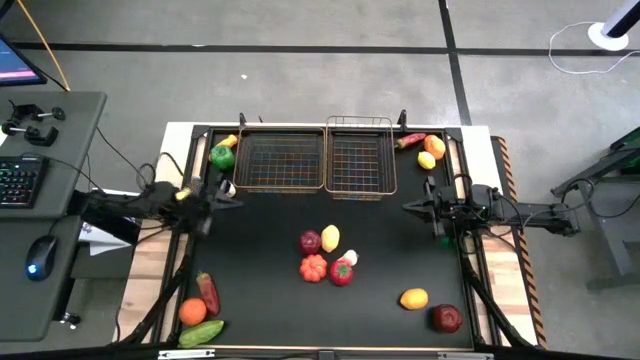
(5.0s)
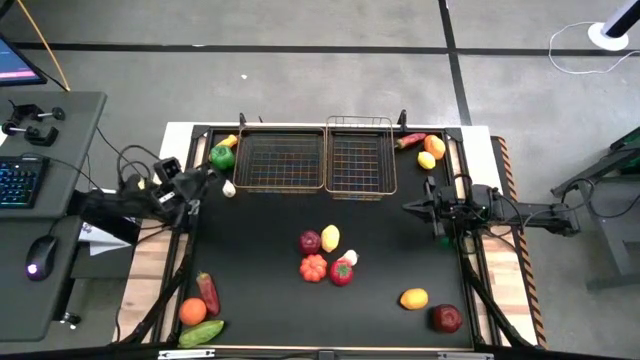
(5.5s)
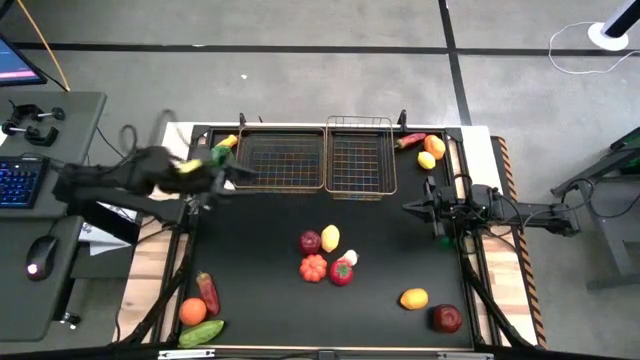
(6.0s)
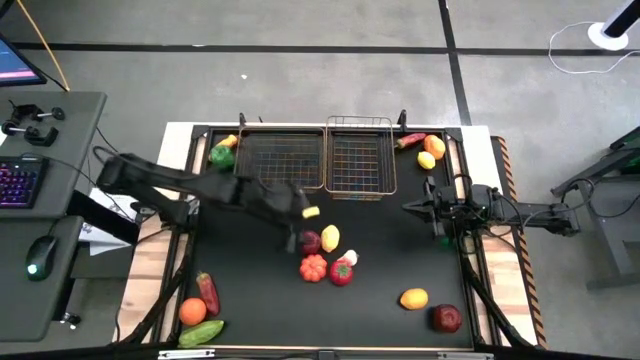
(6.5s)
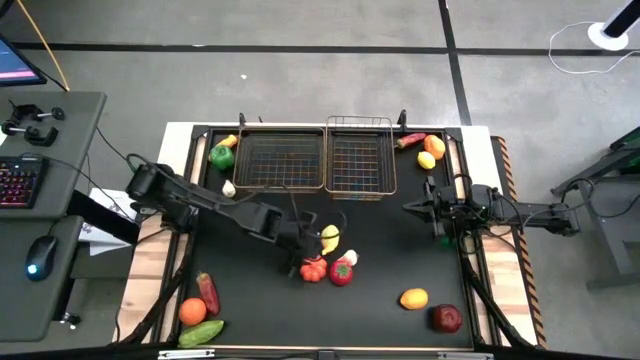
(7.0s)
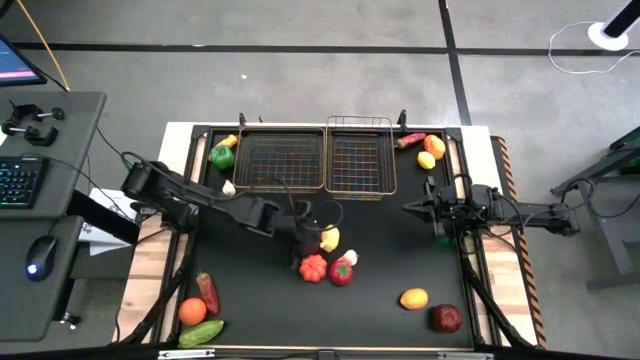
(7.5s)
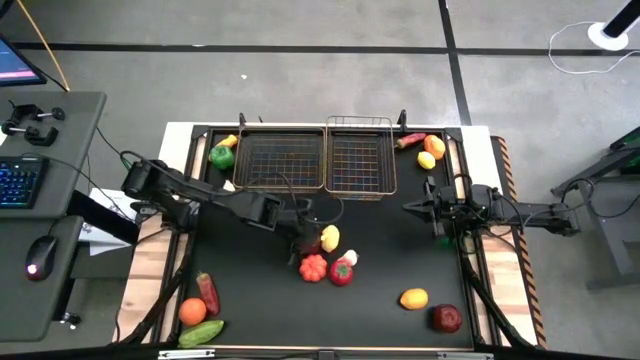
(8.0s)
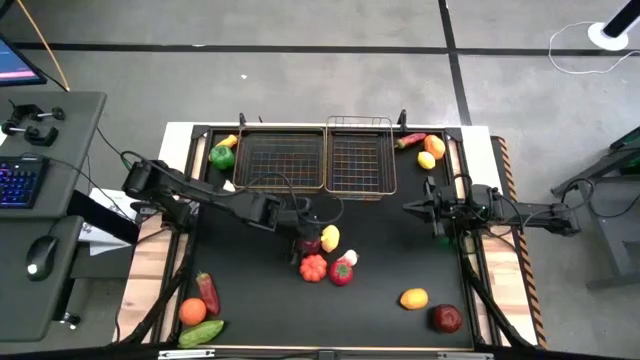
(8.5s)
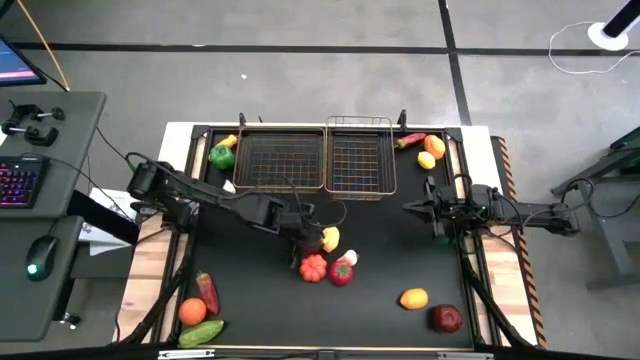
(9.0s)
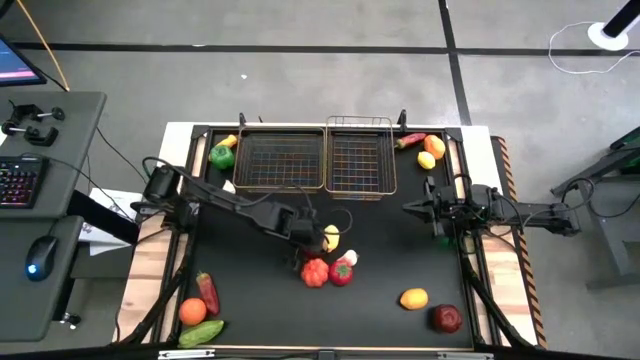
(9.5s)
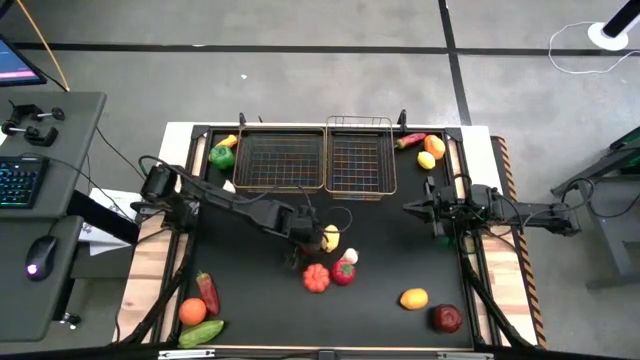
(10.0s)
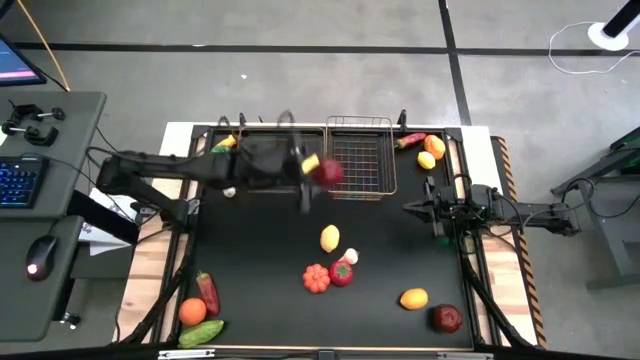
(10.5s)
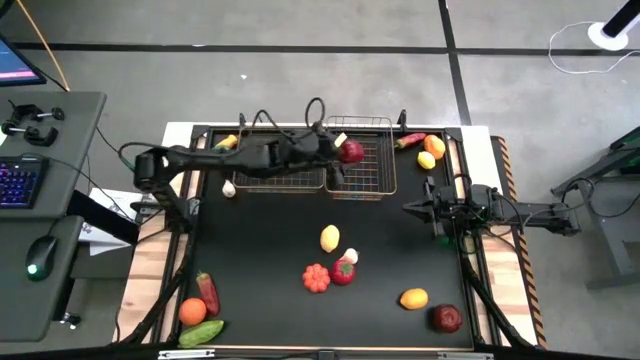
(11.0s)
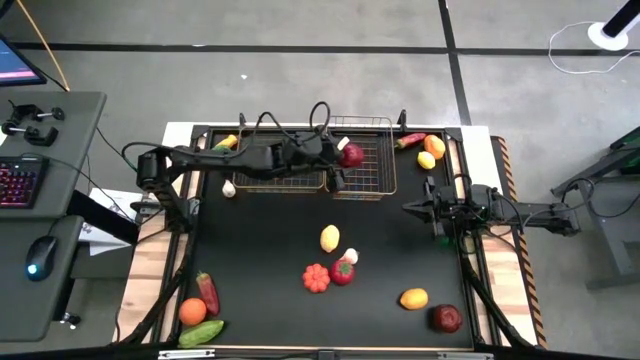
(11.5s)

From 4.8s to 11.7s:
Task: Sort produce into baskets
Put the top red apple into the right wire basket

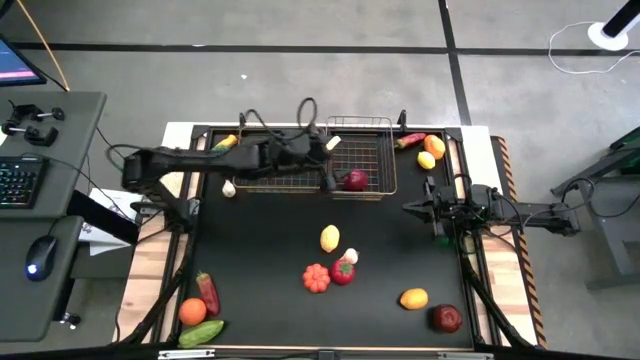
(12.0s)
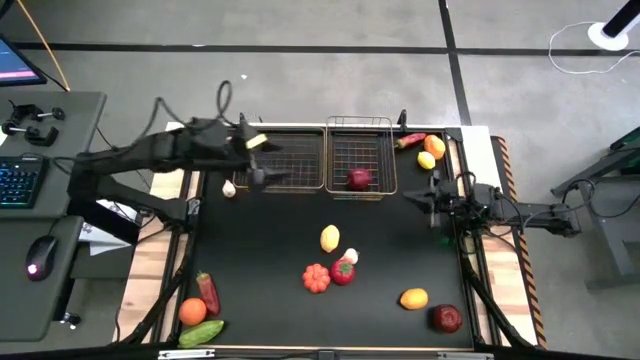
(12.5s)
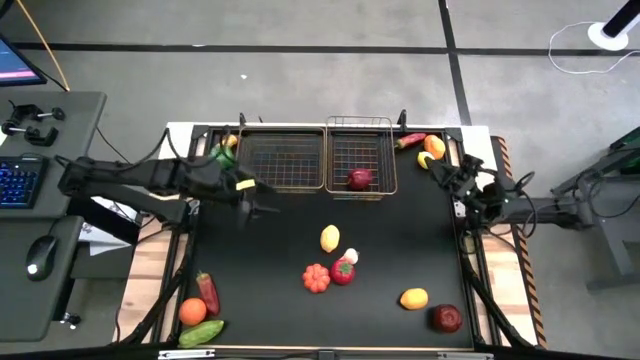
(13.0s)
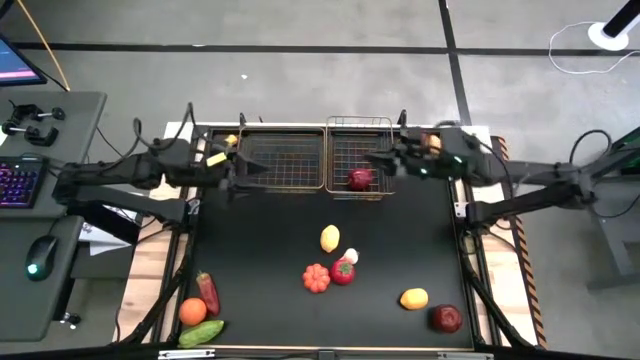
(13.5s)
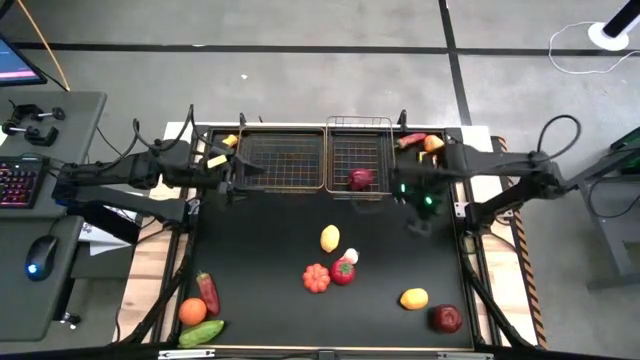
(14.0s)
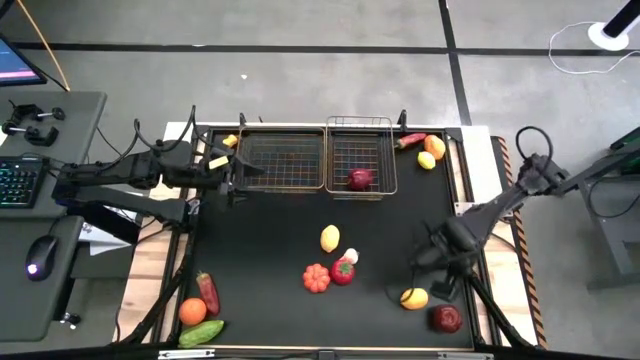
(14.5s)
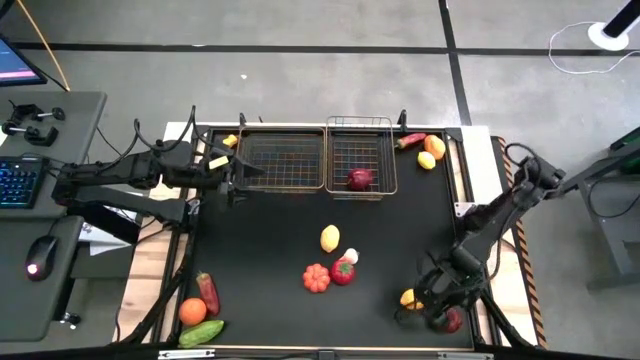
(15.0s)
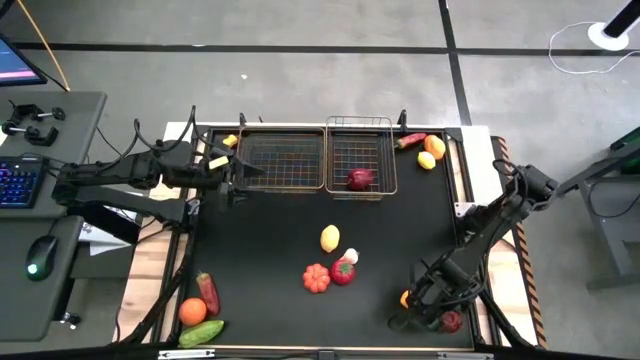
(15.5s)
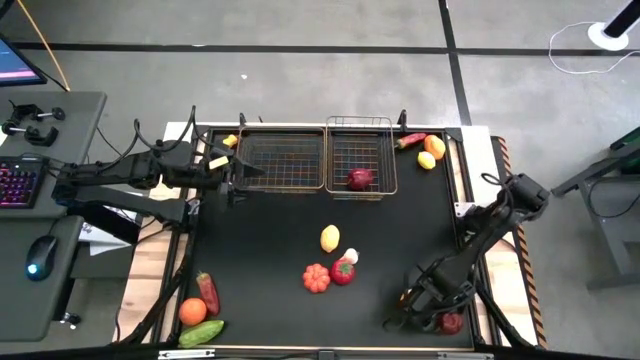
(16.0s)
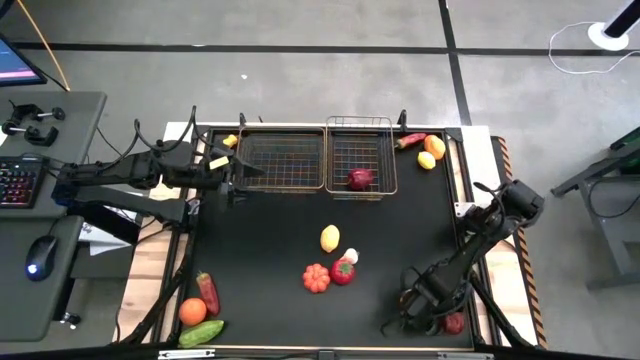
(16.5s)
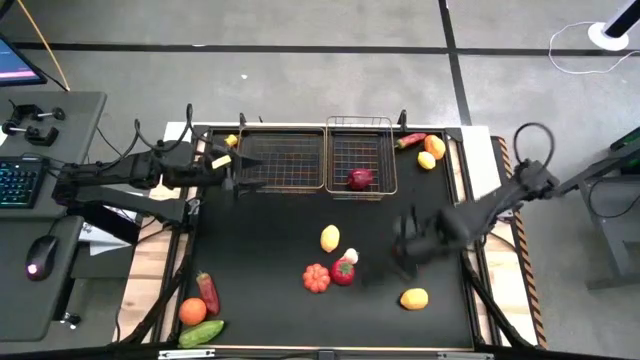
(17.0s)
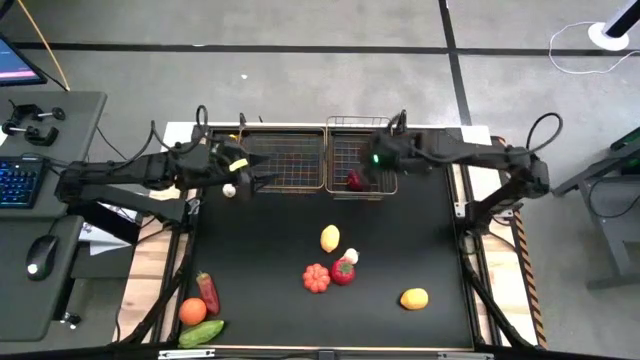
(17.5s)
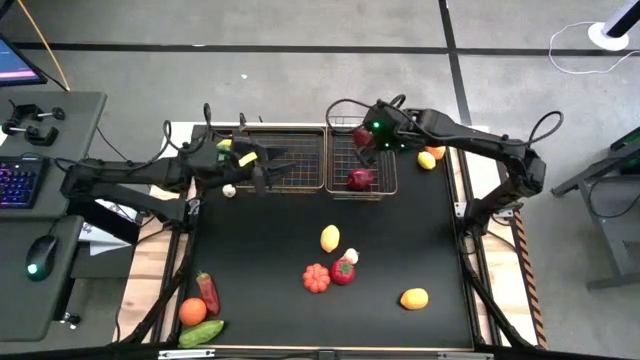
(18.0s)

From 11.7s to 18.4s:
Put the red apple into the right wire basket

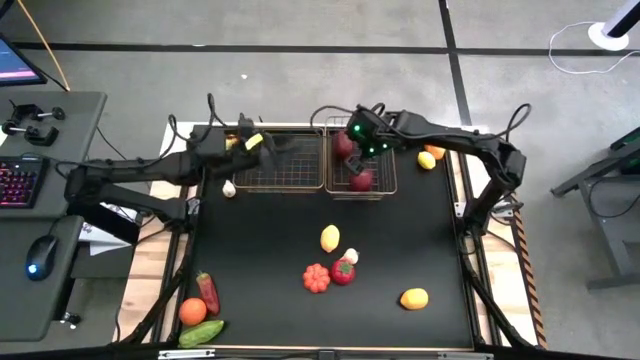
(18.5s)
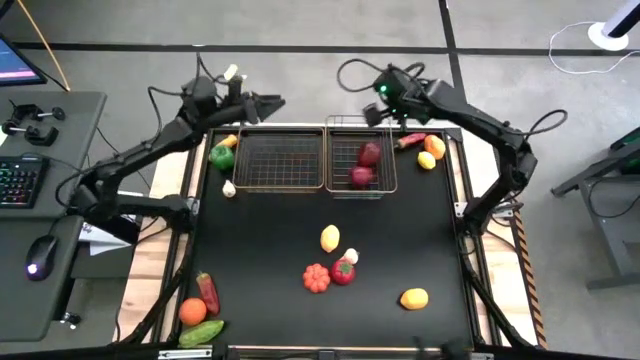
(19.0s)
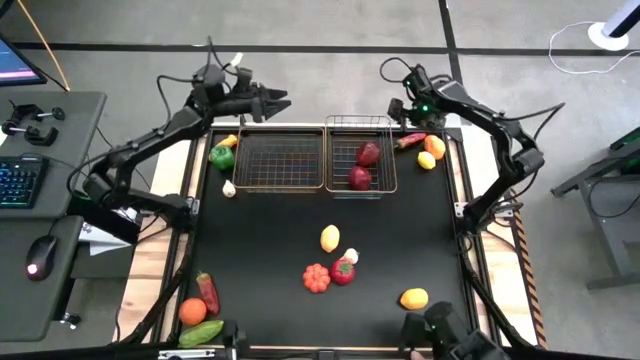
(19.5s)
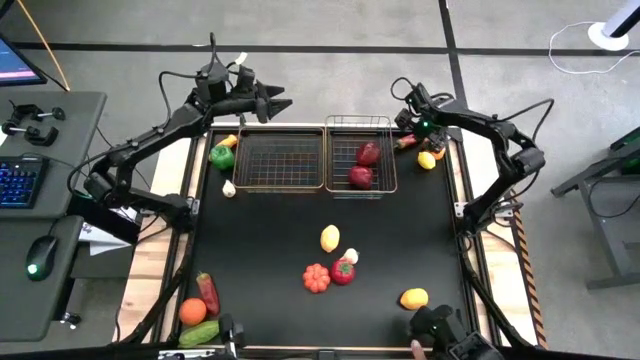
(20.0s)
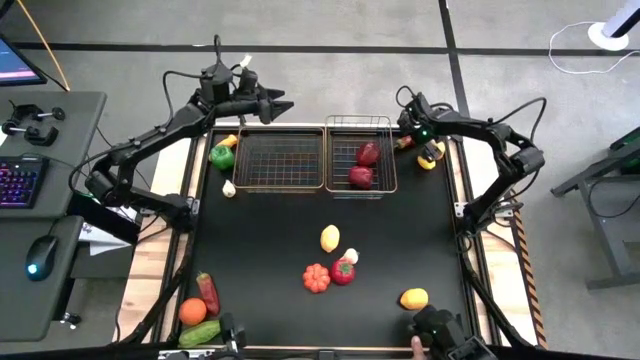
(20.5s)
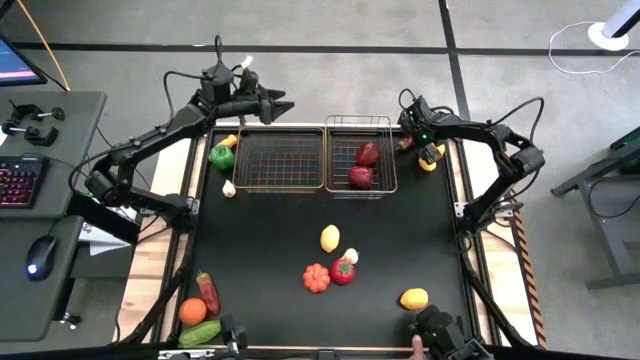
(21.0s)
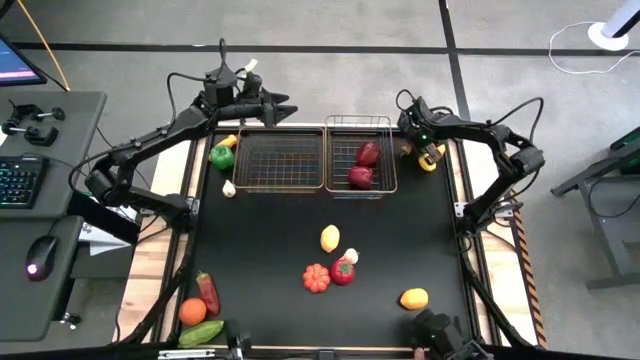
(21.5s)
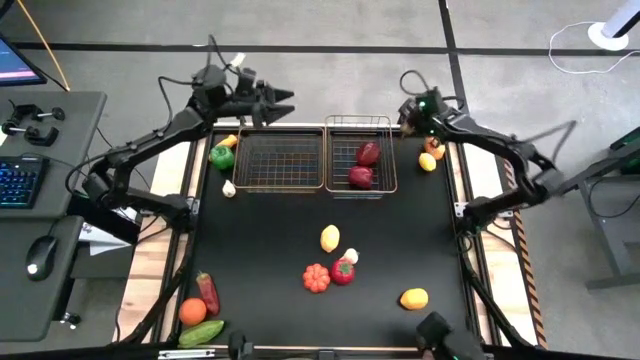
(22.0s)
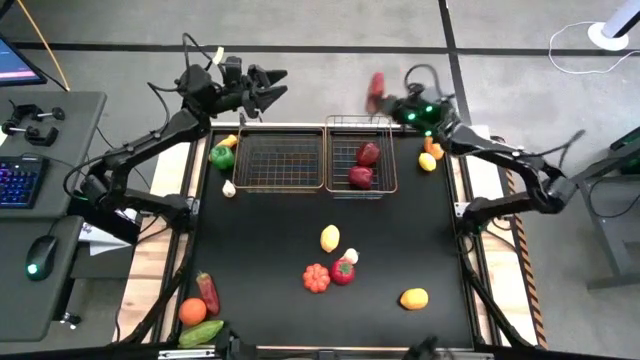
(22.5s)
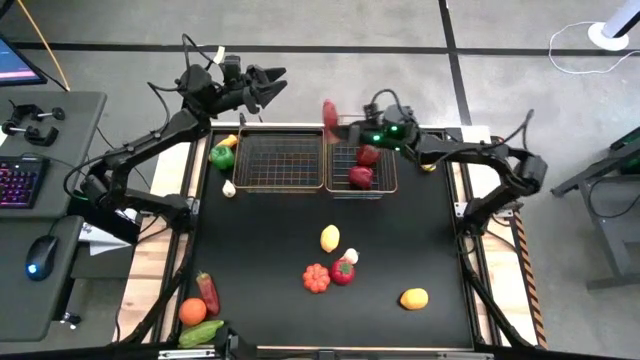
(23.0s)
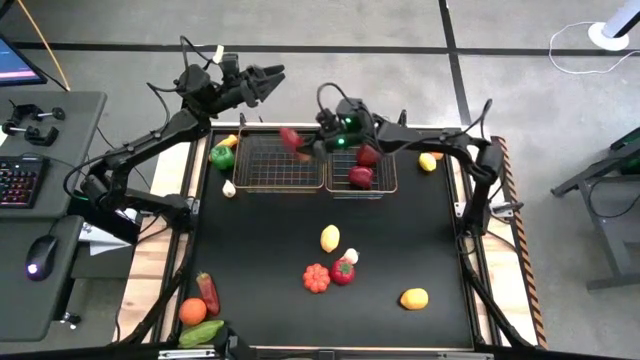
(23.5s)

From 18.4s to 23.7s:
Put the top right red chili pepper into the left wire basket

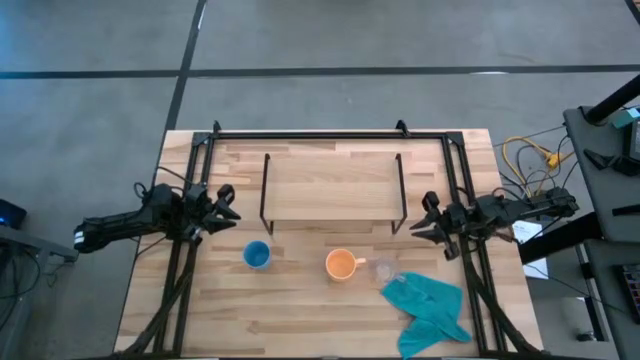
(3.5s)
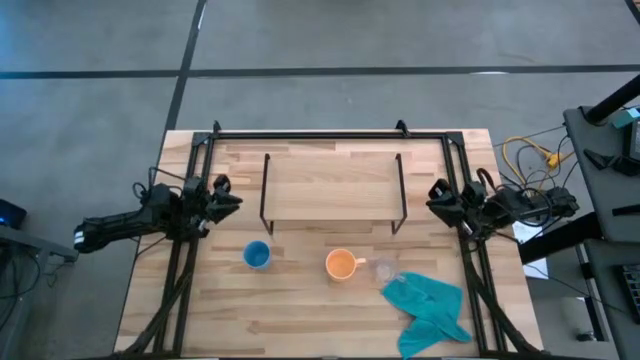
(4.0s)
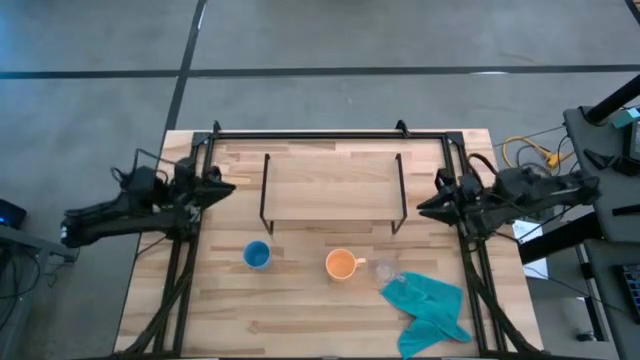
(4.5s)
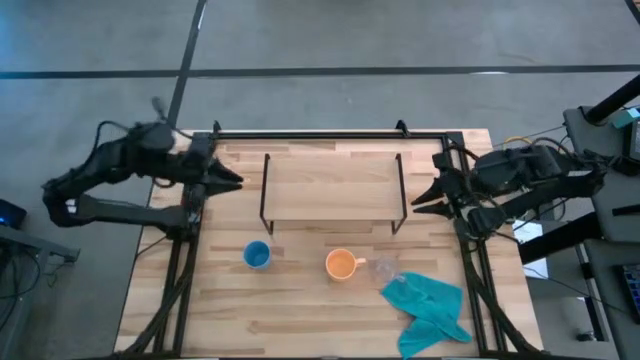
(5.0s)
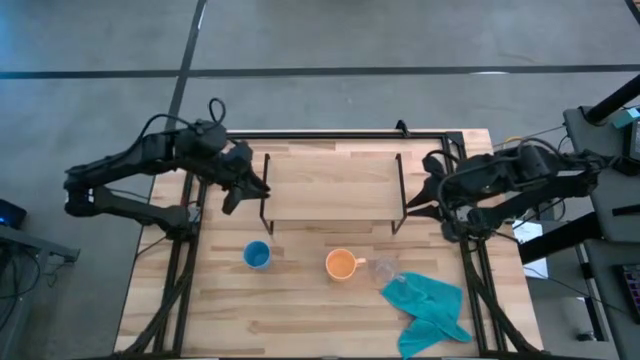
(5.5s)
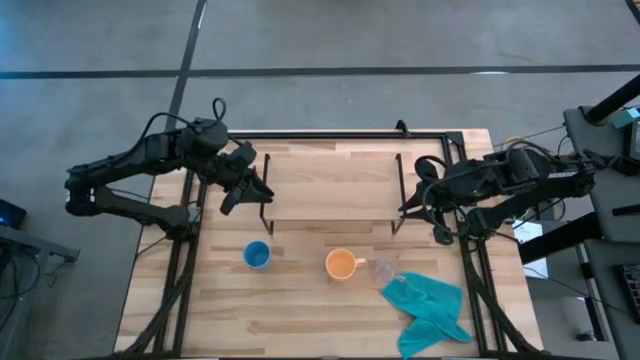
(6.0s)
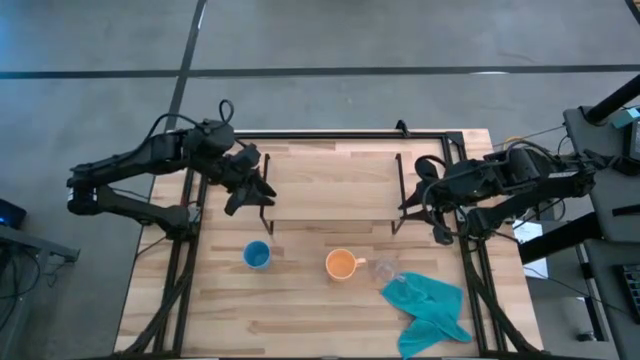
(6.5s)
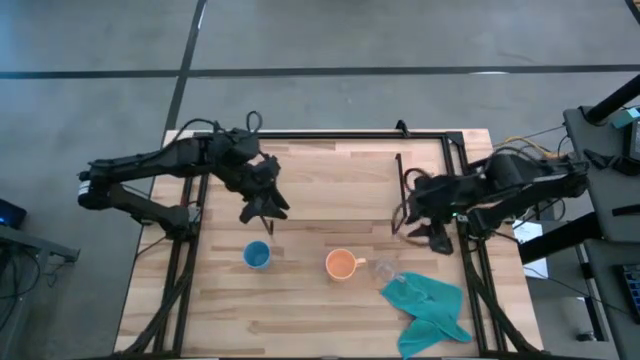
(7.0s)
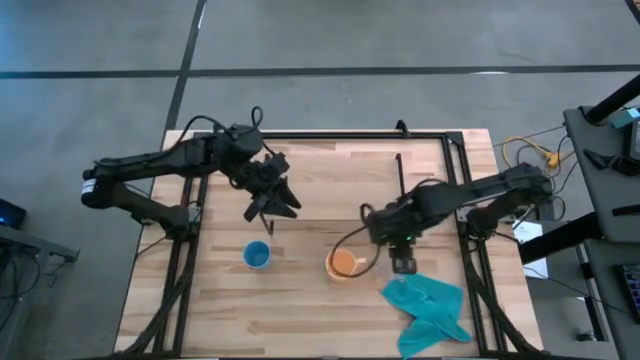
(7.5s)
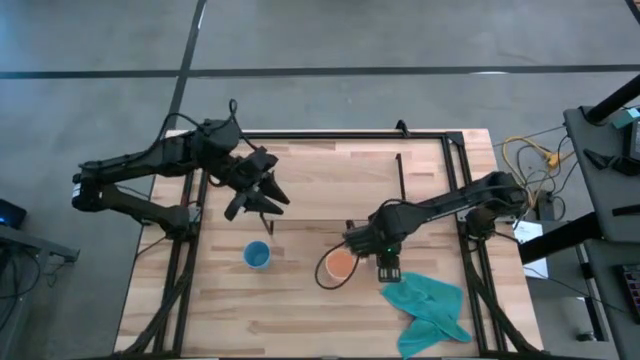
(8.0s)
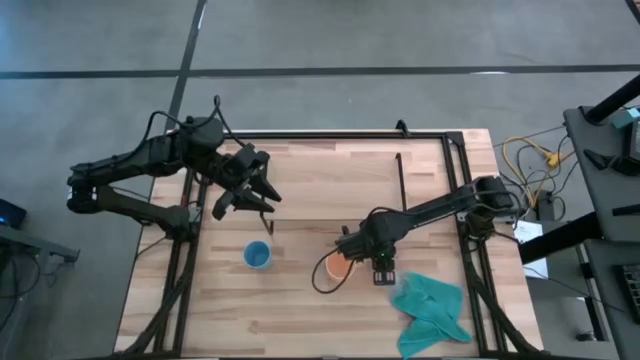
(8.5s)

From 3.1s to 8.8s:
Task: Stack small to large cups/mugs on shelf
Put the transparent mug on the shelf
